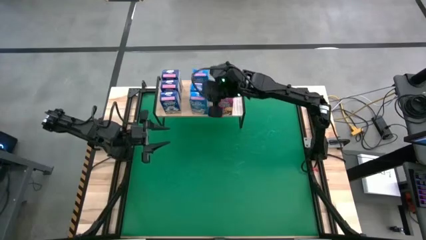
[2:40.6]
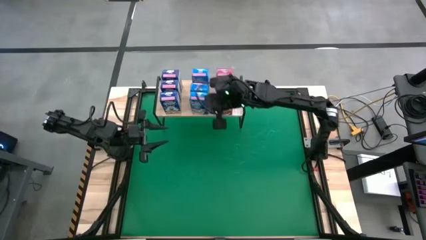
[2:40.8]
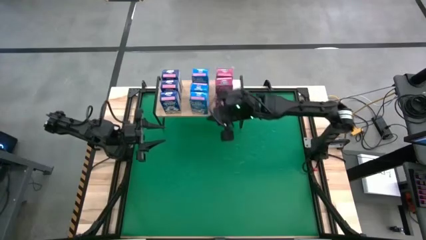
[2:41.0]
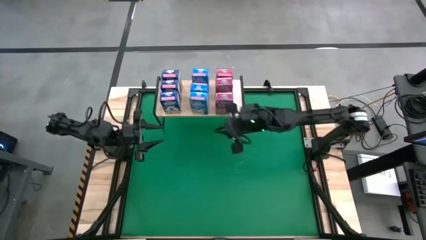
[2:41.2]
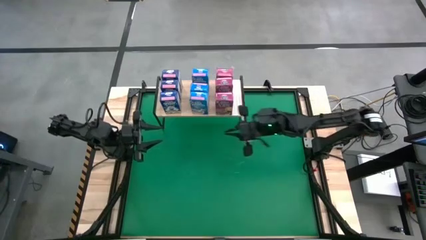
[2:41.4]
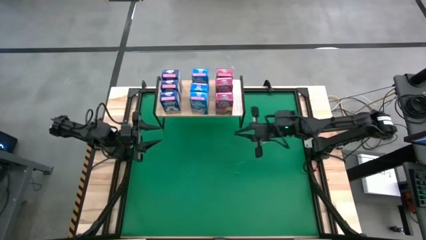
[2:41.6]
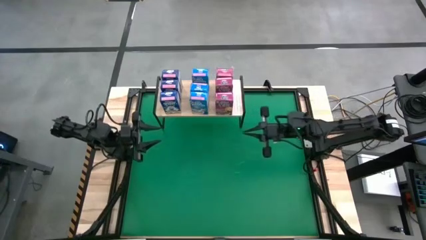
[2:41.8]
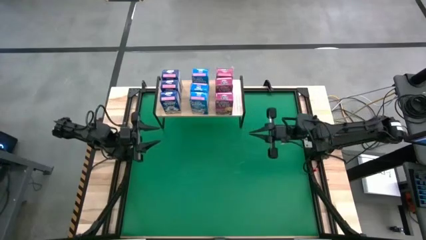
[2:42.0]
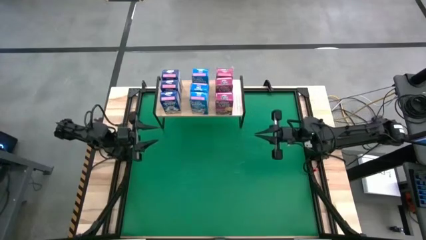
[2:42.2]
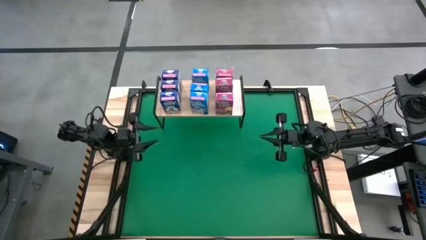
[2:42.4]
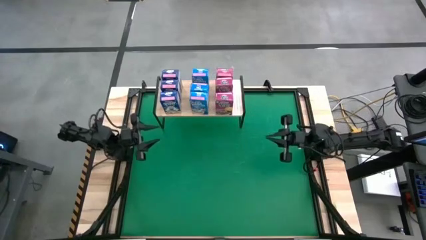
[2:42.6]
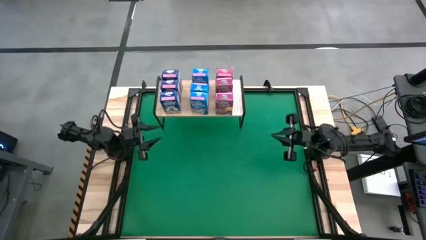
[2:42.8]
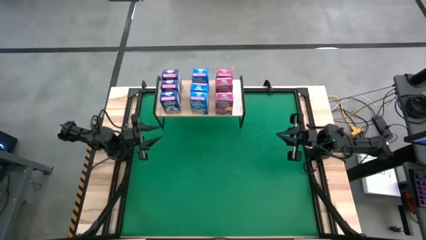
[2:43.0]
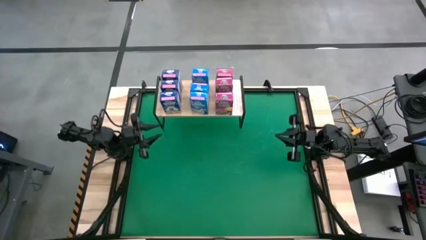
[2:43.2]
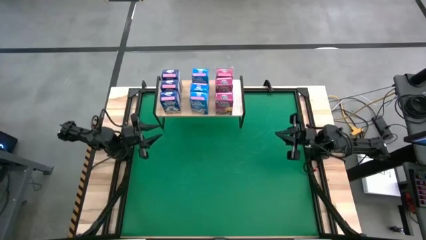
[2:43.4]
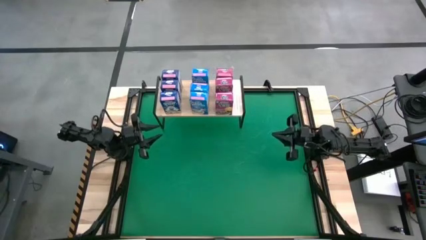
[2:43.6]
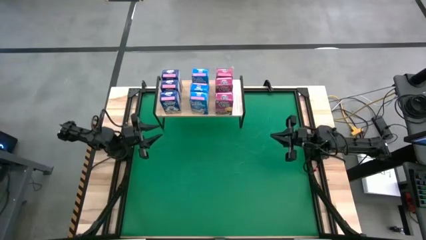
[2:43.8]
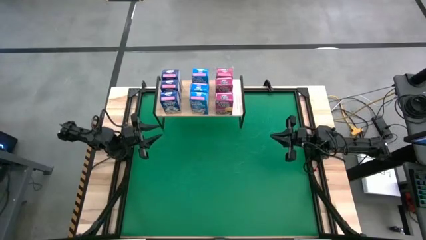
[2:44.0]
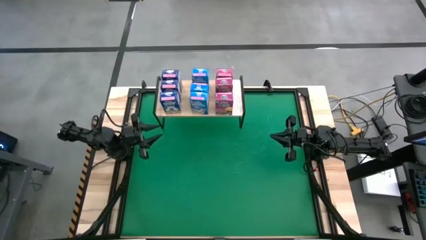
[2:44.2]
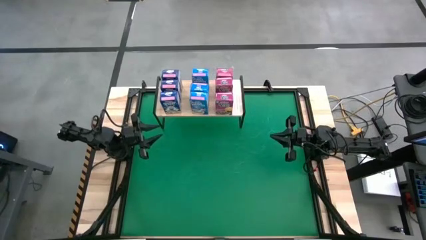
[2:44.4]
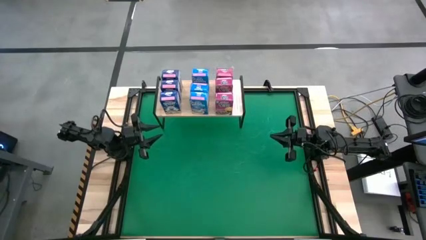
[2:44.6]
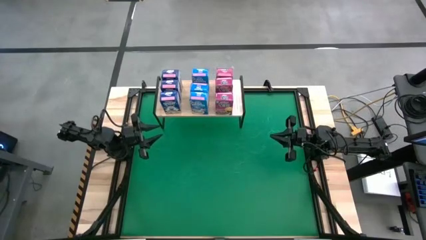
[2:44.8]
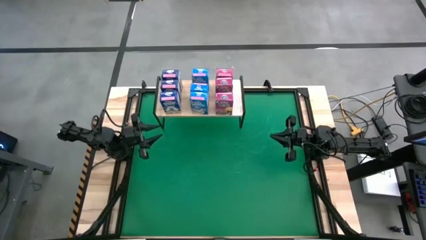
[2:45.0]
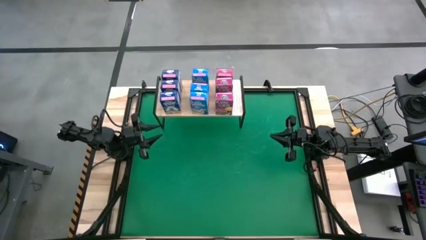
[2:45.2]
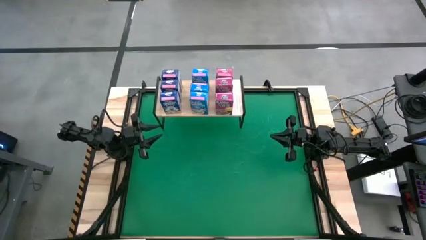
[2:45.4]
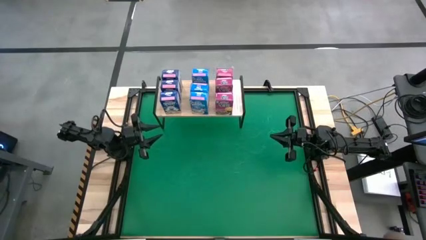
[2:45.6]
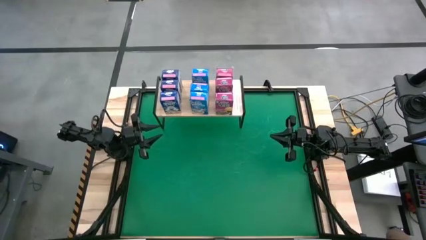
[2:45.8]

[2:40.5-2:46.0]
Task: Stack cereal on shelf
Return to Home Position

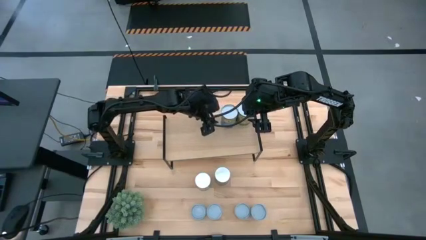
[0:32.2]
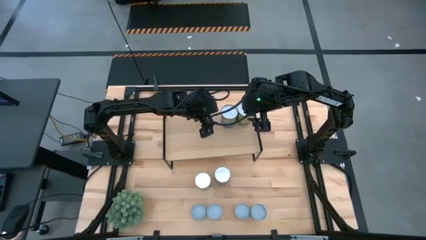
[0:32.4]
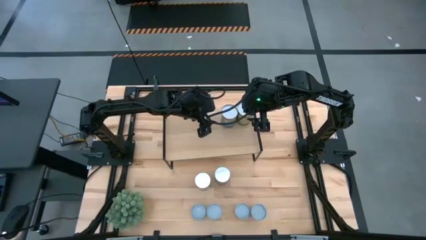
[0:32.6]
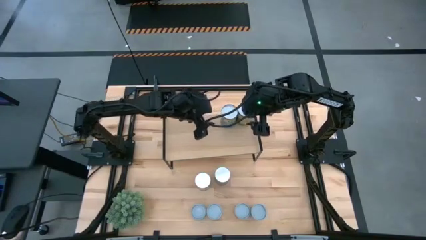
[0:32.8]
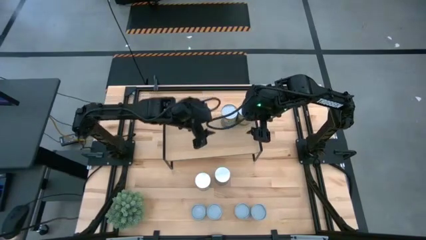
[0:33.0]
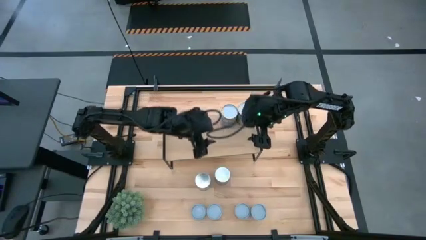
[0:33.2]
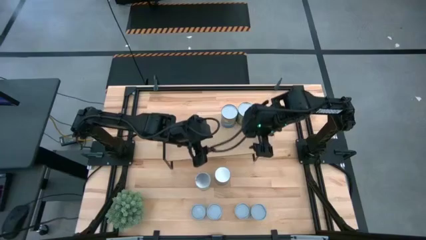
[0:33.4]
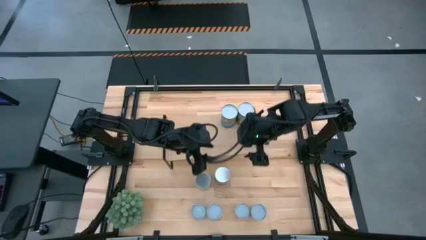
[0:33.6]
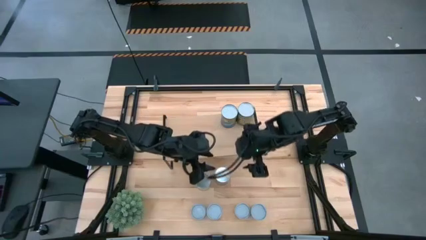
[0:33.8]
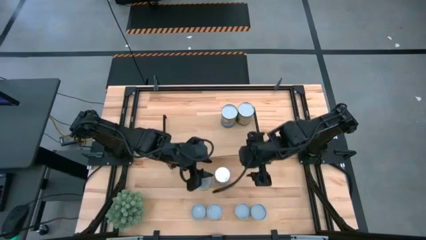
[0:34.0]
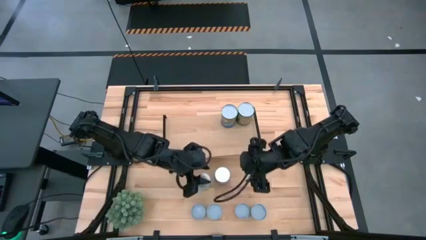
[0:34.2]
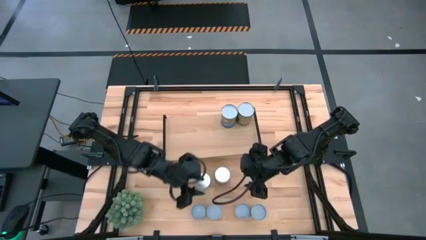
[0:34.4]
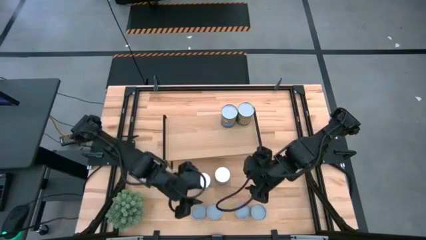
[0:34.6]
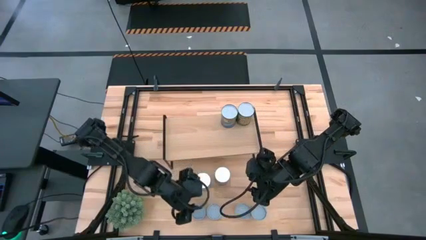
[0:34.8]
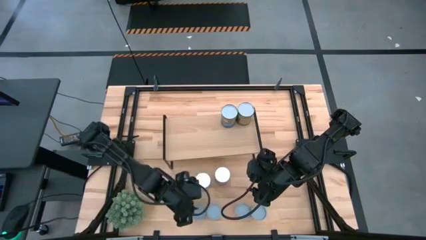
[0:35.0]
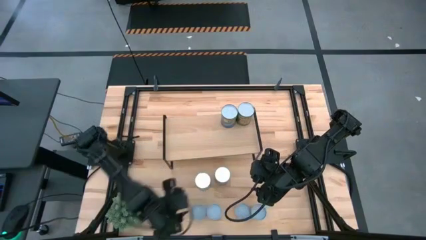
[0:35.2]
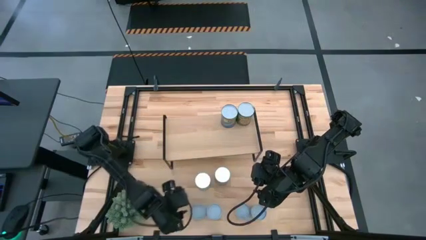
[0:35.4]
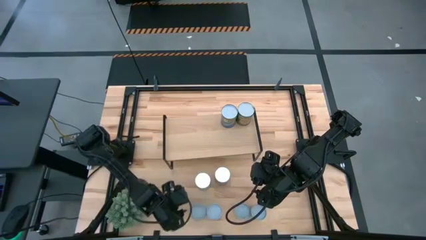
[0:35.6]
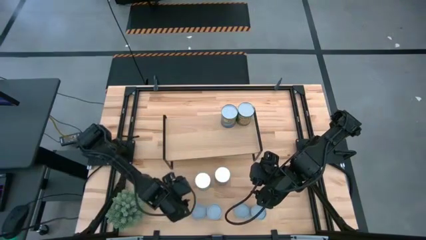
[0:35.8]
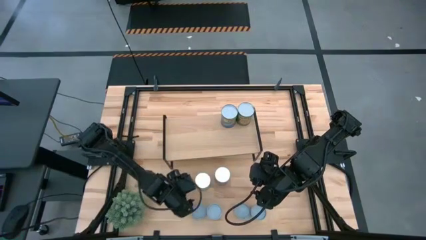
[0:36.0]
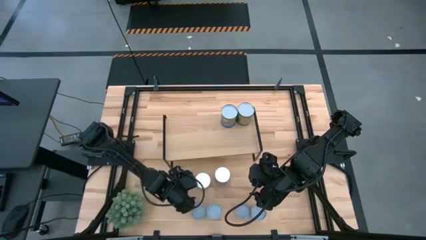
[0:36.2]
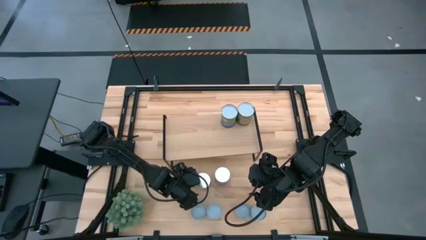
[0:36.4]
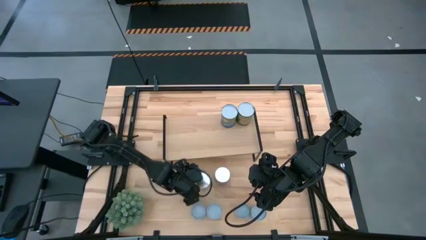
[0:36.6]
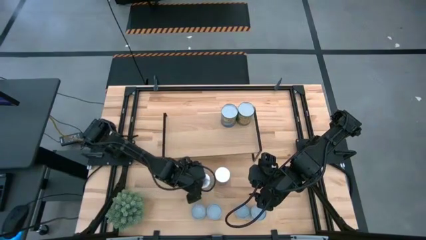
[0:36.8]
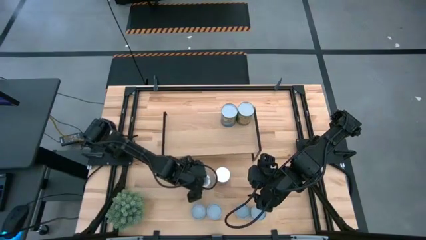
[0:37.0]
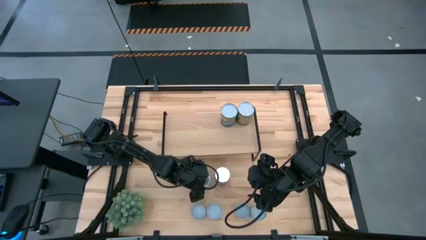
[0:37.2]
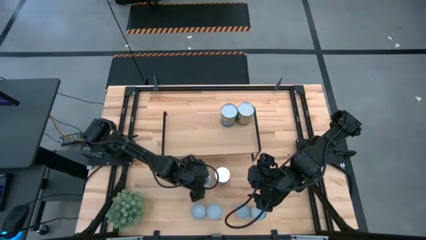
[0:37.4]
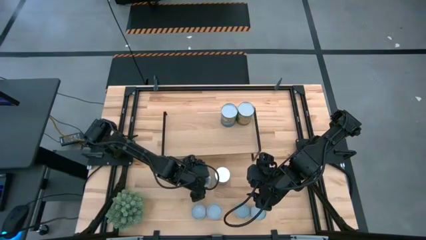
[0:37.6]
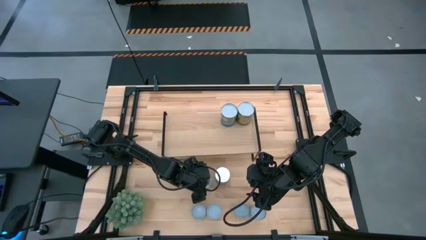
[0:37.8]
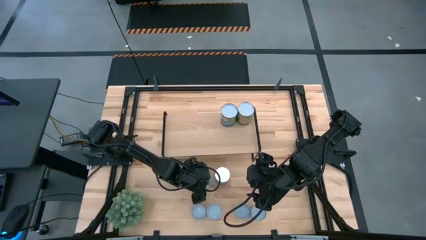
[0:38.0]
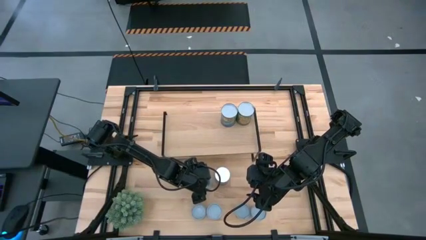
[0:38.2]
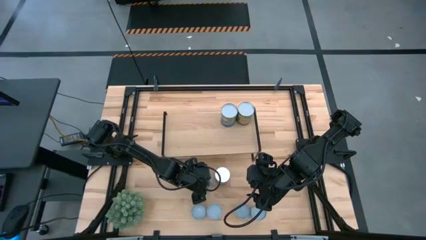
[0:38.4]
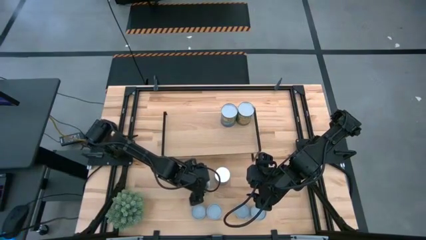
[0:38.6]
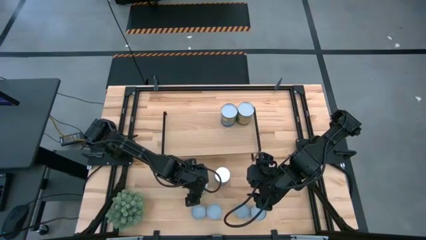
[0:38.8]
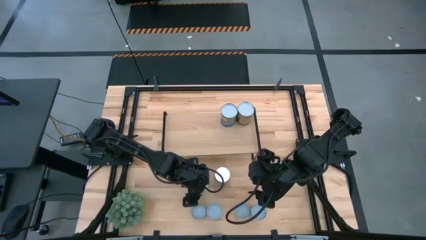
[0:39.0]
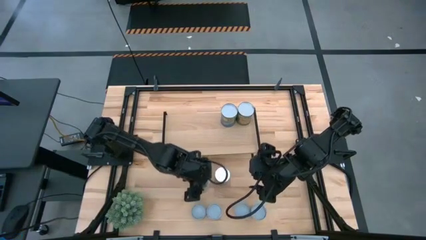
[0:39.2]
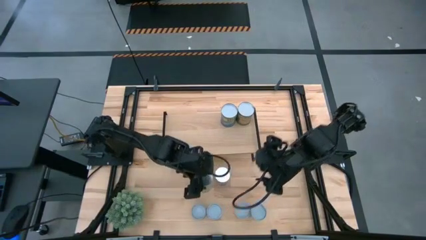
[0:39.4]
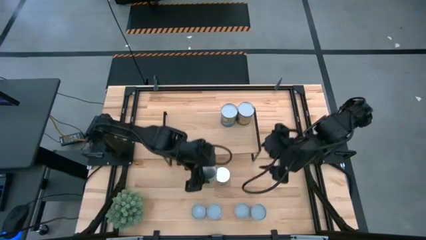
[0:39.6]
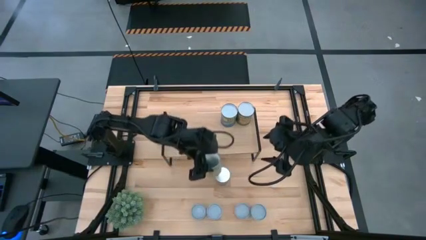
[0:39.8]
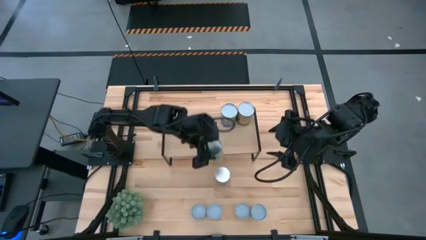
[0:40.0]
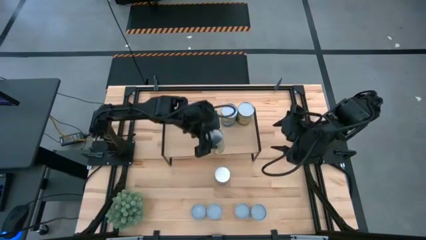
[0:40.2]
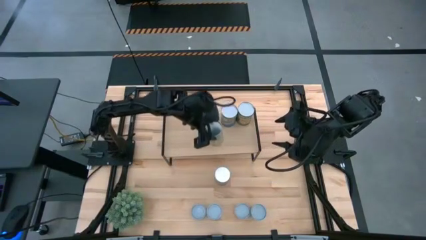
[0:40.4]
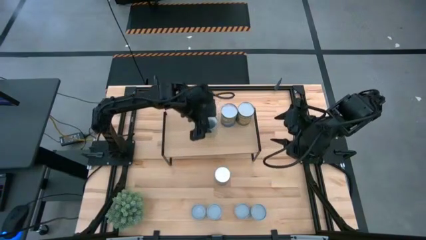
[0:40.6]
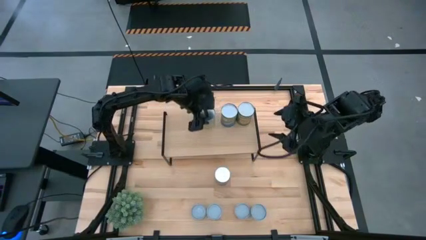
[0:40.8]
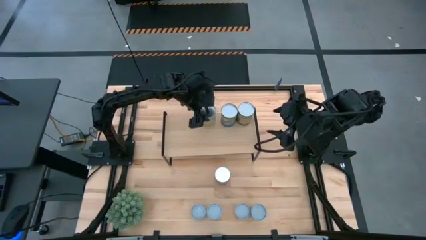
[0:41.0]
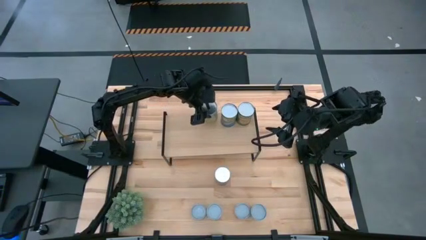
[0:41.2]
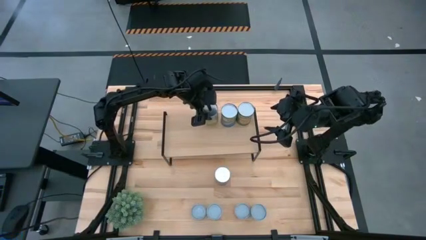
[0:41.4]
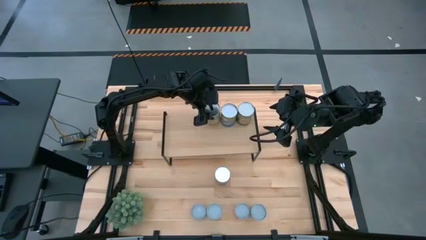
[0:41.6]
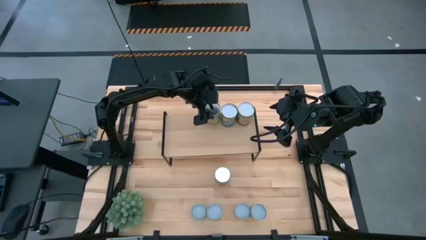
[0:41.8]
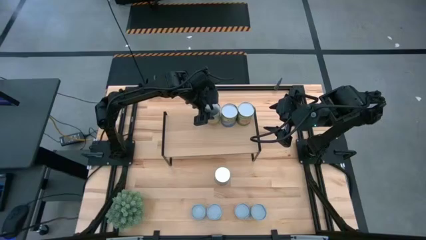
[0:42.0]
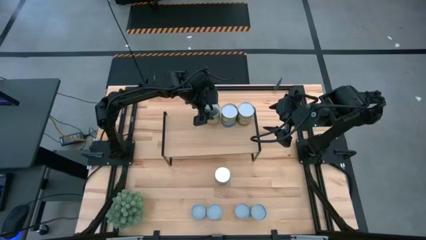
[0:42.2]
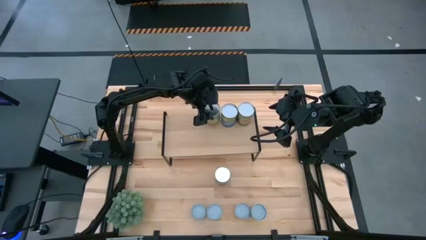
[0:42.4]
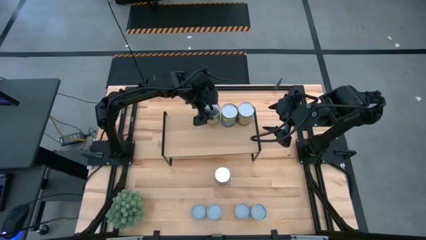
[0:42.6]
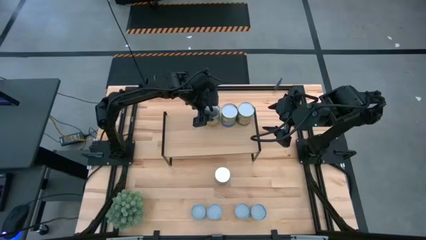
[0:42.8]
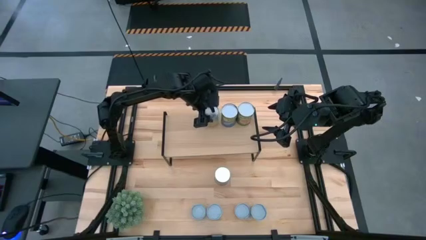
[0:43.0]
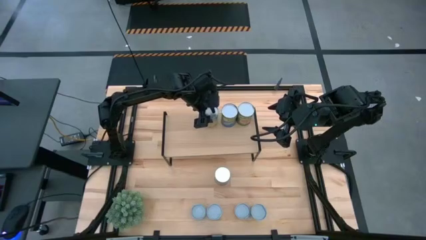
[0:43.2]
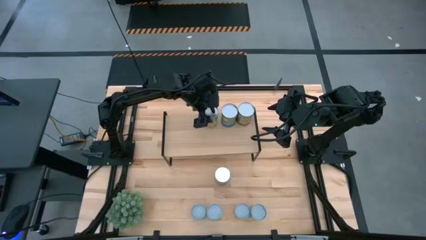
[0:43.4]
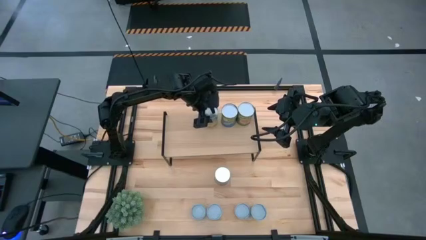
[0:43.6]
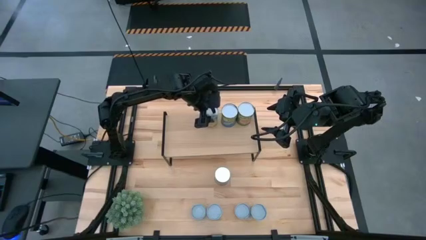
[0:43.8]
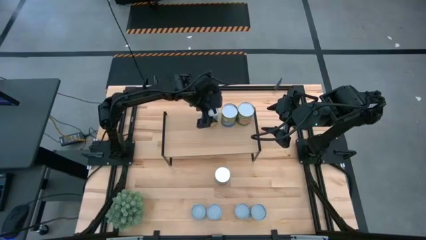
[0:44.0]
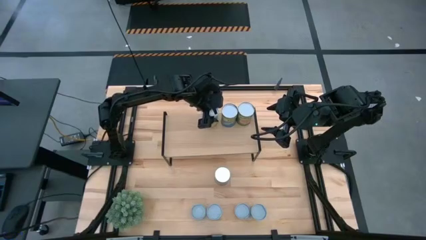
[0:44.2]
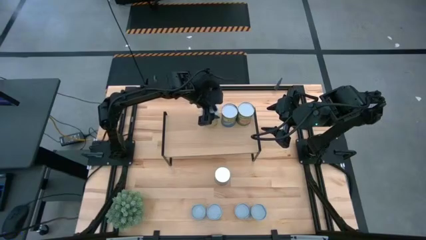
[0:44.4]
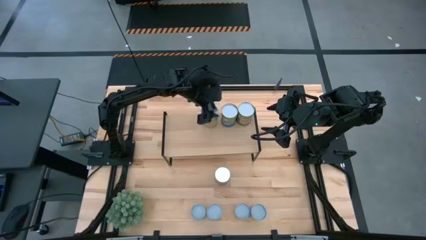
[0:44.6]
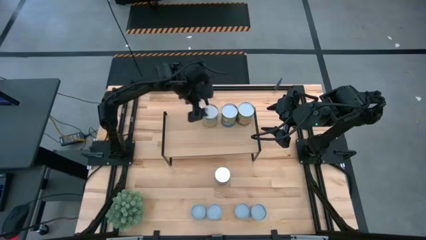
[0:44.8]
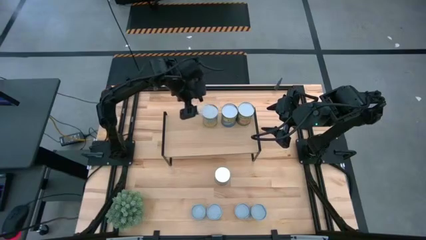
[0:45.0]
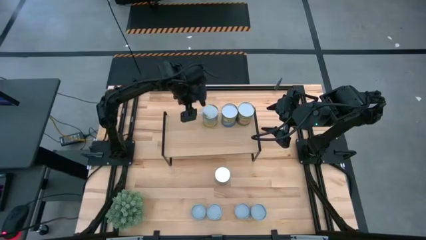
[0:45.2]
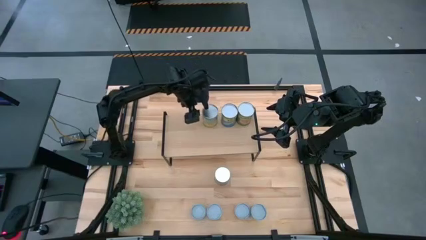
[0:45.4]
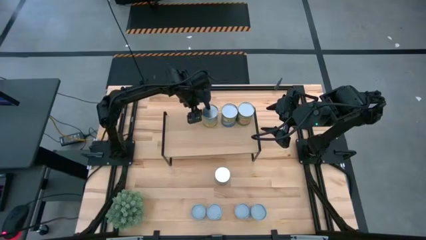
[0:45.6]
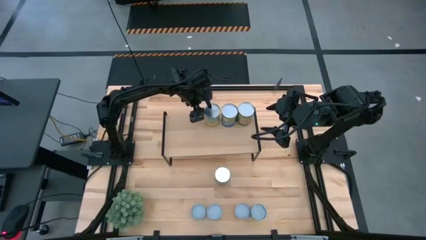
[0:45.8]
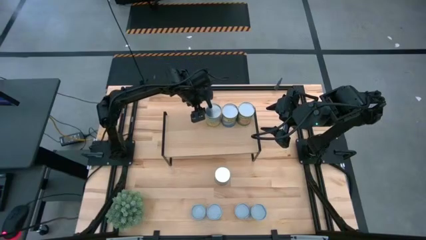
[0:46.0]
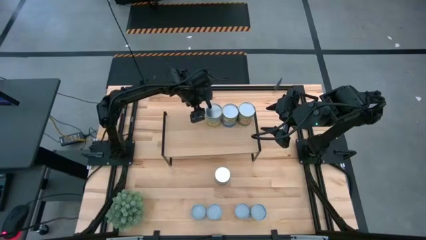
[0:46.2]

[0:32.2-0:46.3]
Task: Pick and place cans onto a shelf
Put the canned carrots on the shelf
